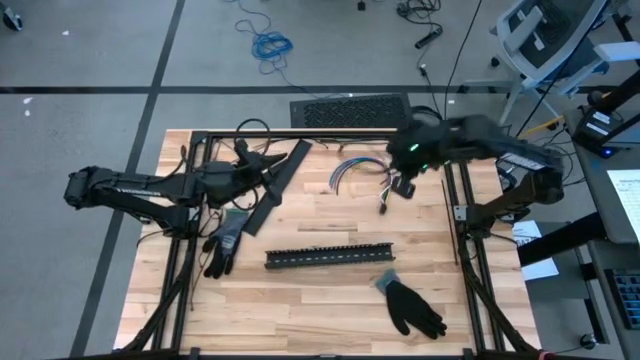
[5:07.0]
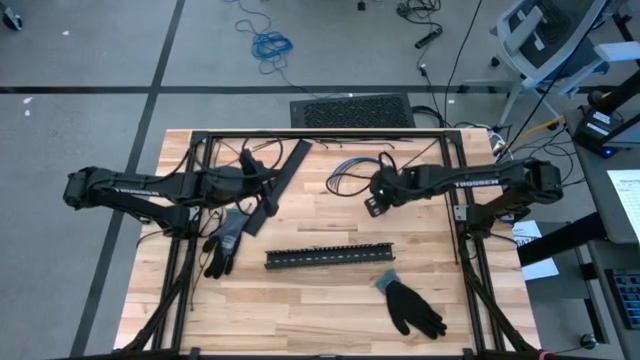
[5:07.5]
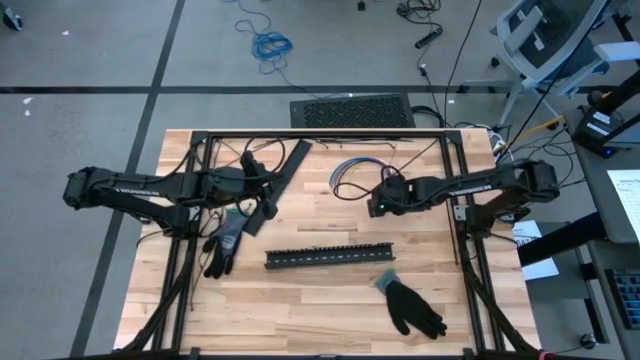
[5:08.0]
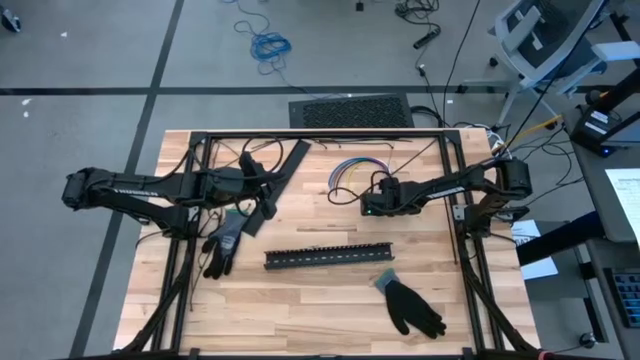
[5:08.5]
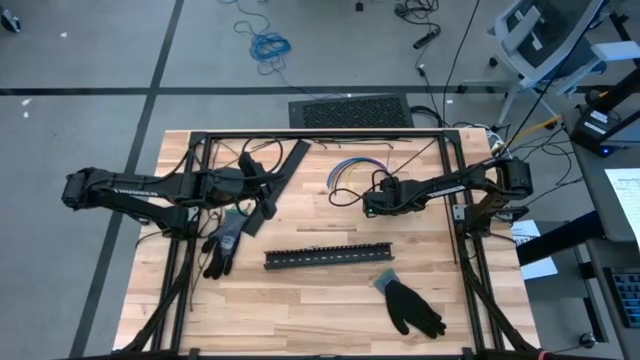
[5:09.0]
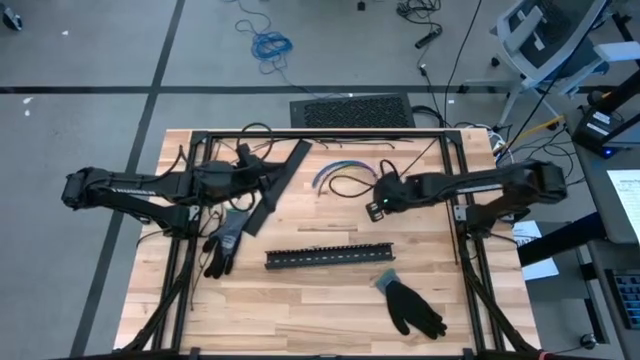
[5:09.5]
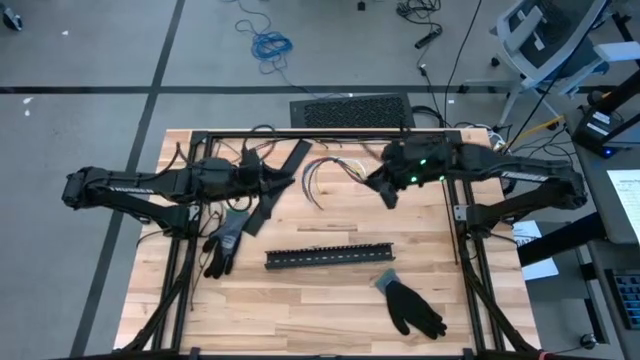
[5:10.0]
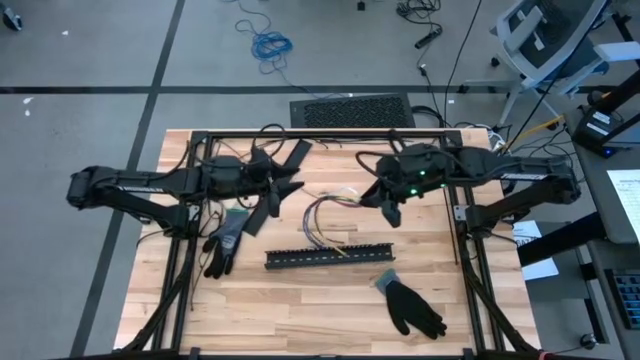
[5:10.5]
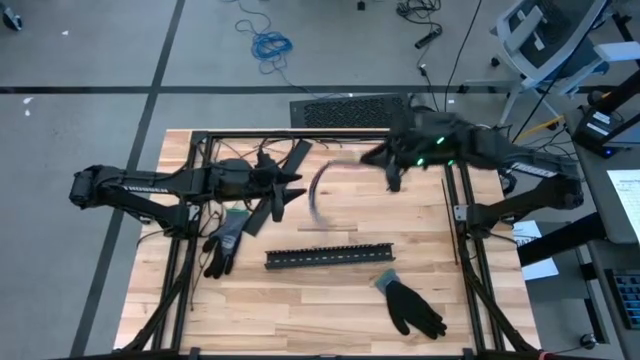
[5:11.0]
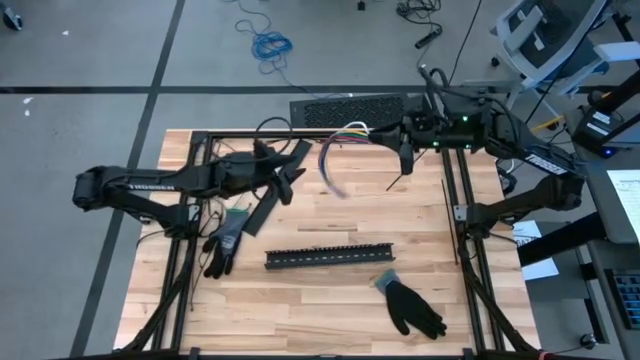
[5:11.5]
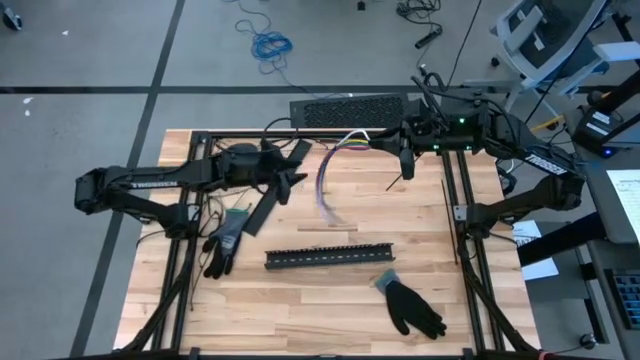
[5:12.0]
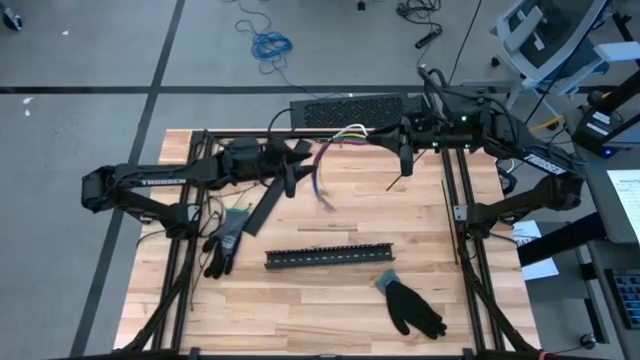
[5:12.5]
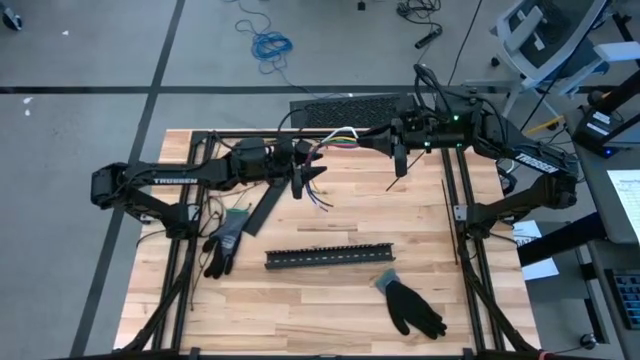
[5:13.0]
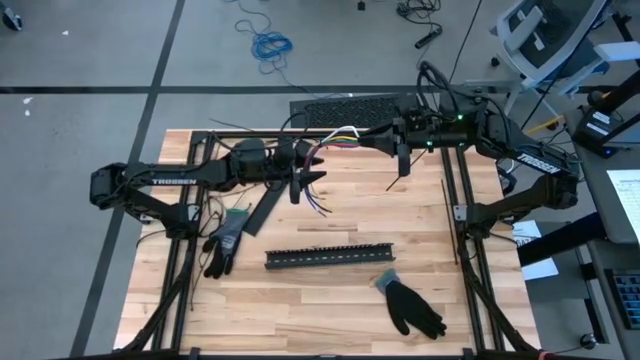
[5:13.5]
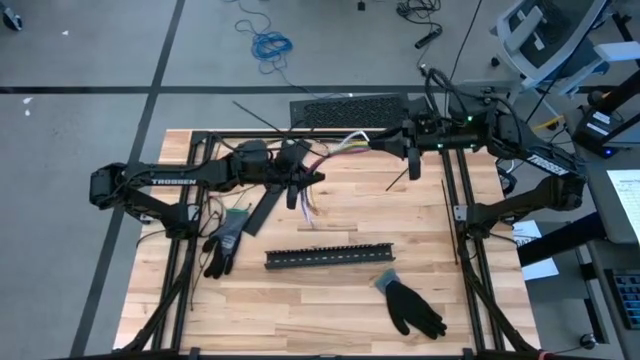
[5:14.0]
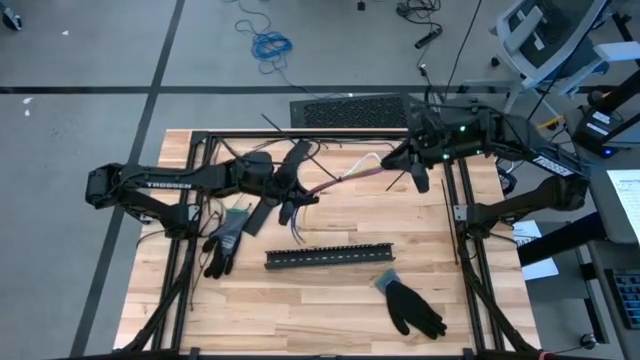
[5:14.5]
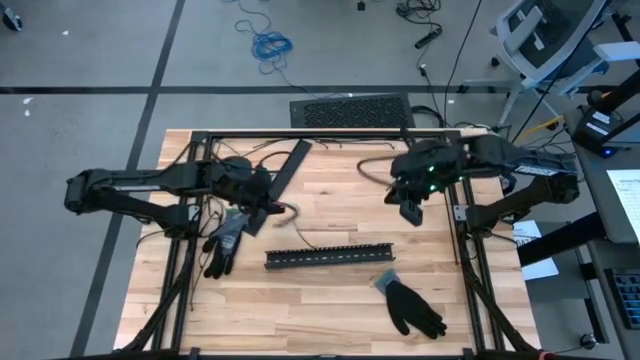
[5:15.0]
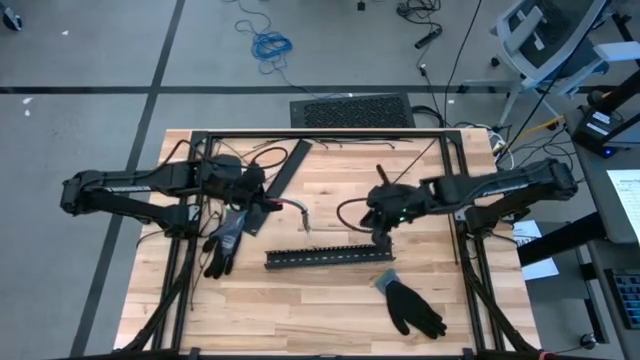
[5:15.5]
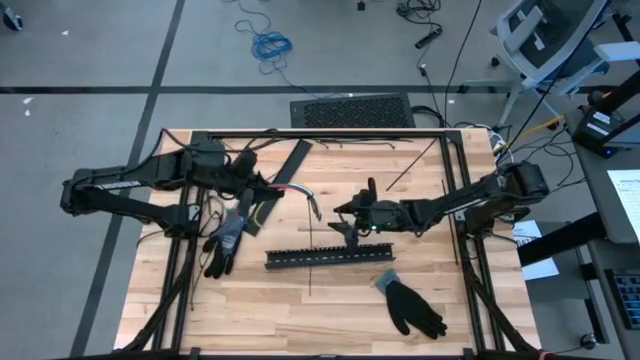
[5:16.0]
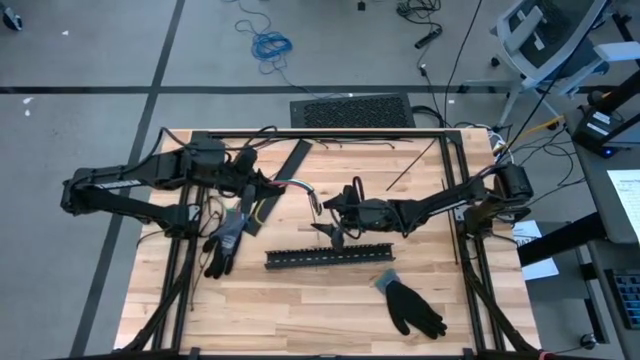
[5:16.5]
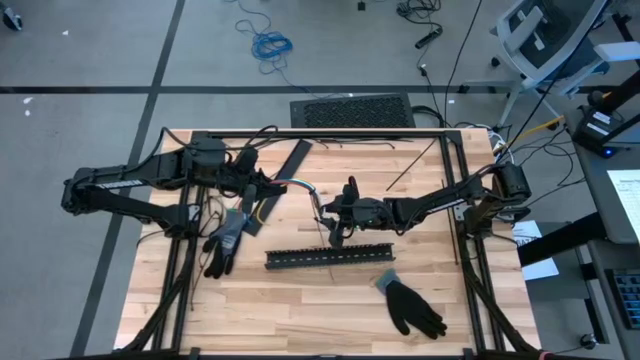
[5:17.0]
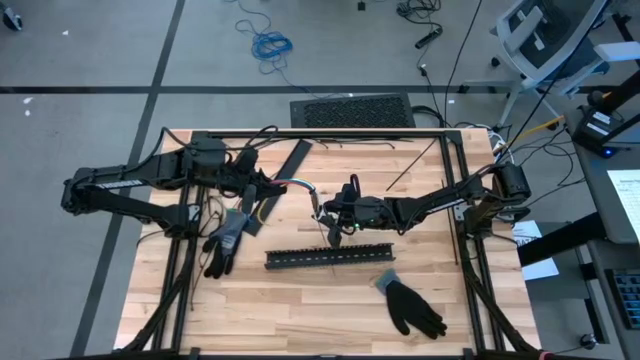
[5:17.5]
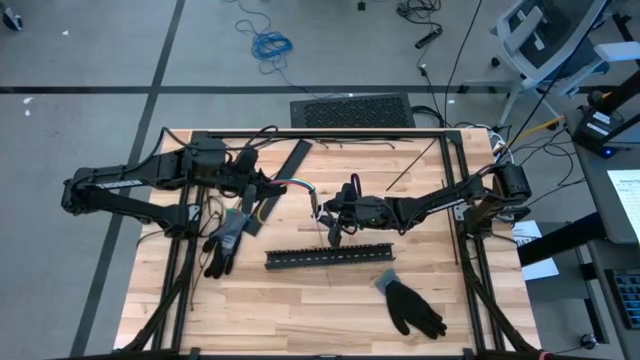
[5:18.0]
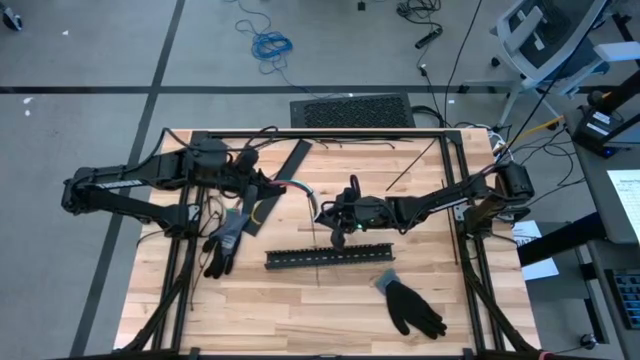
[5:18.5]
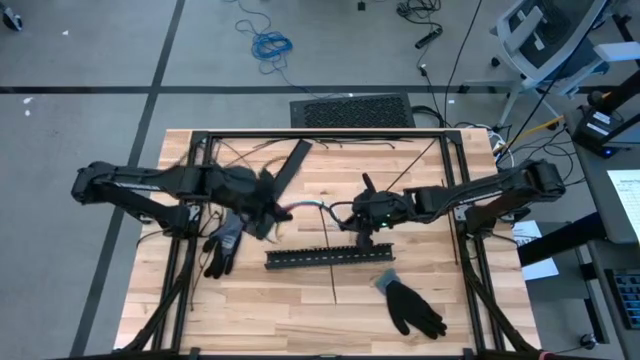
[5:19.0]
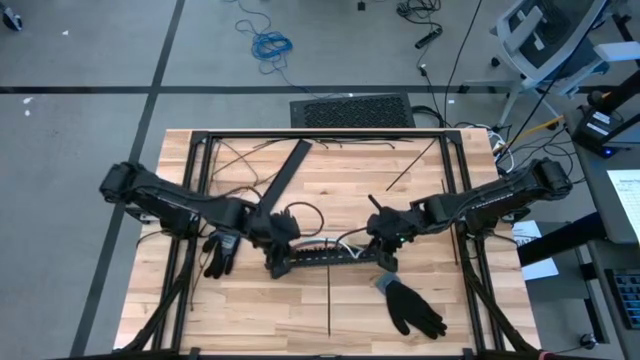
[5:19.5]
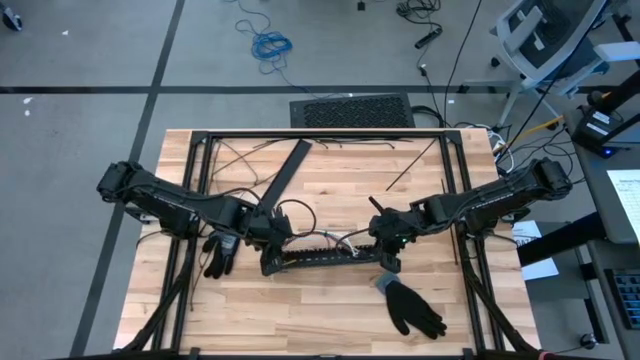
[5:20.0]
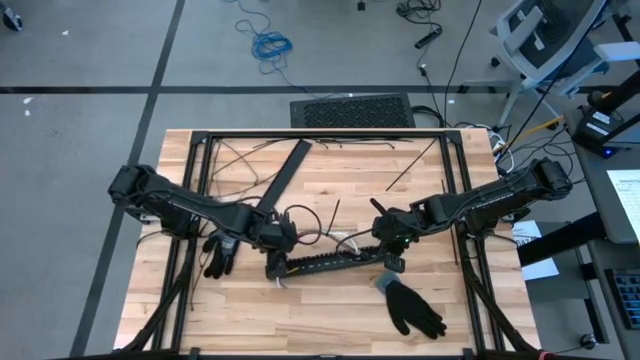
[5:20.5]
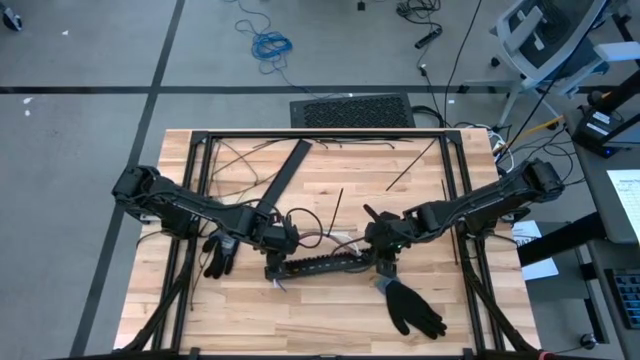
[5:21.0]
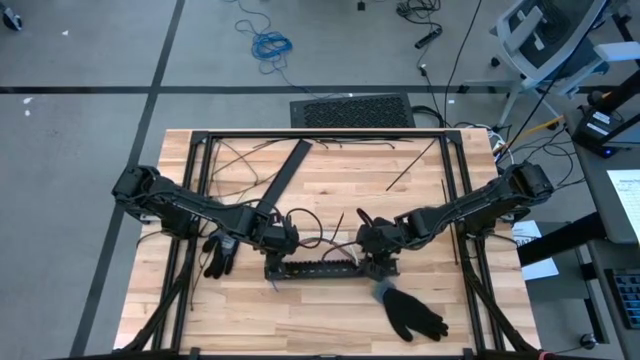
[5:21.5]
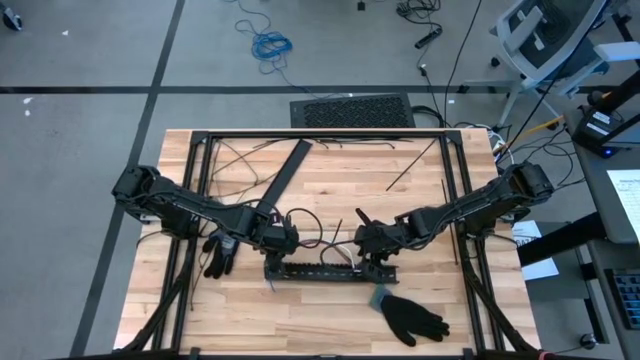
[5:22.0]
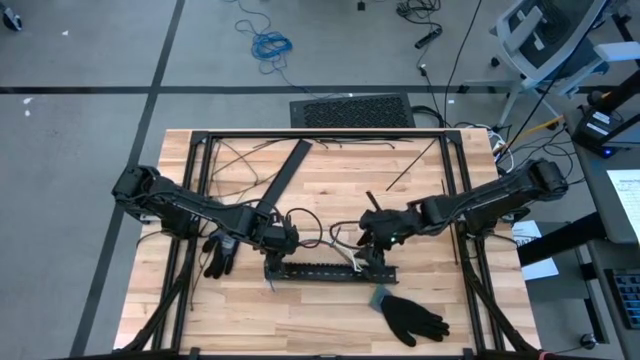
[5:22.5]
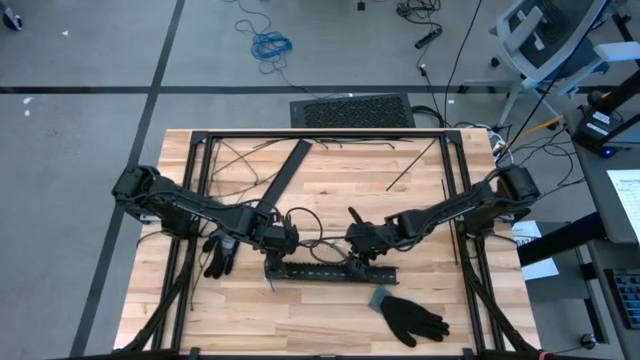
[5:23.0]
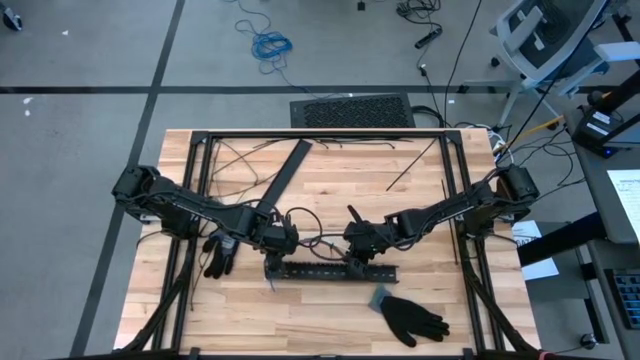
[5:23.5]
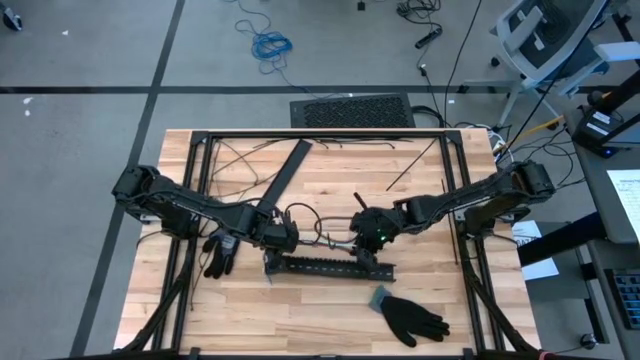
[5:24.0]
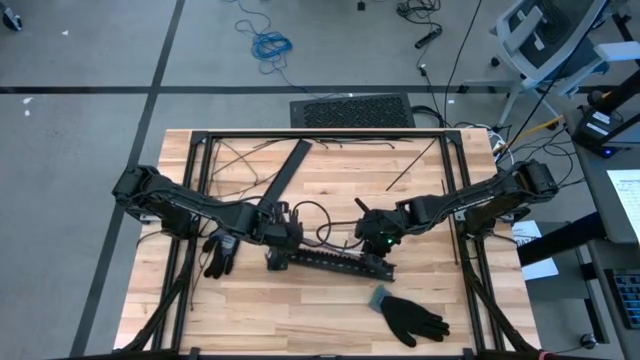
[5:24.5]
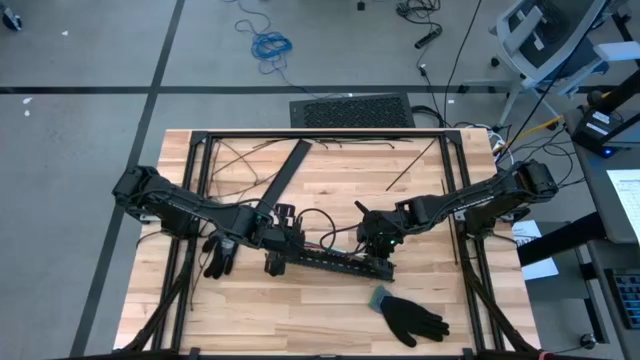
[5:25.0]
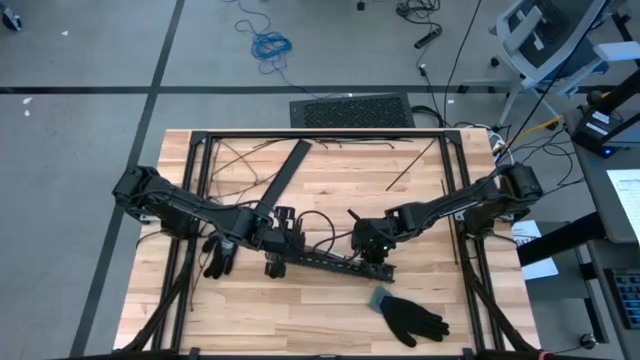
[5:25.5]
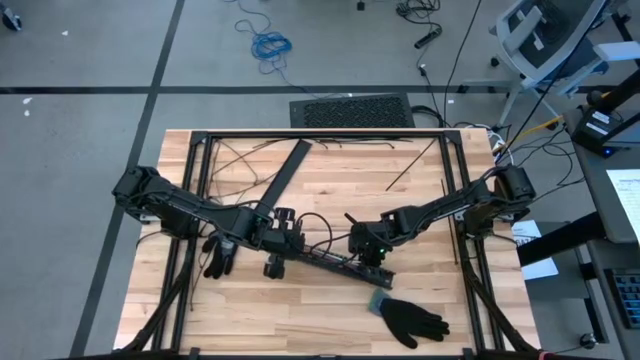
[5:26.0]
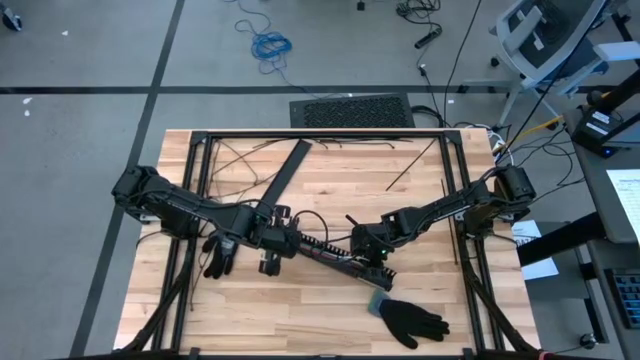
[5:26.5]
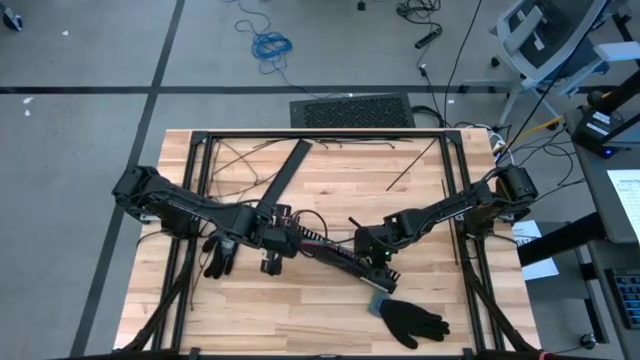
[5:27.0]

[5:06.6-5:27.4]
Task: Ziptie cables
Put the ziptied cable wires into the cable duct
